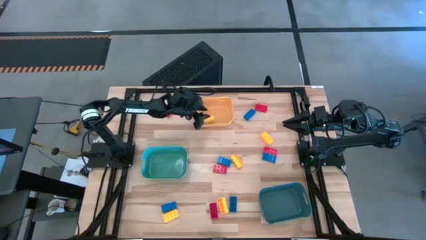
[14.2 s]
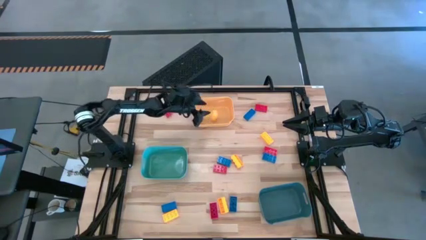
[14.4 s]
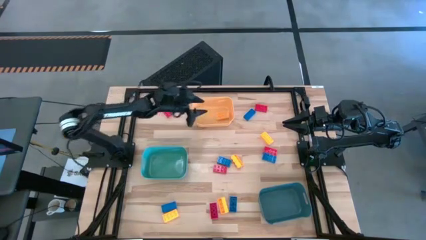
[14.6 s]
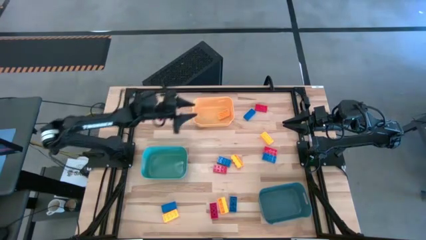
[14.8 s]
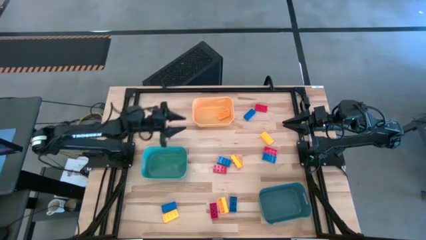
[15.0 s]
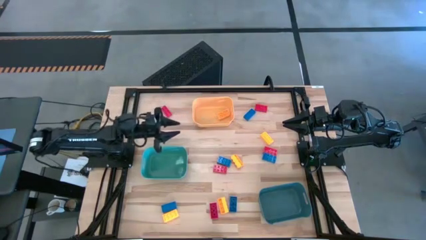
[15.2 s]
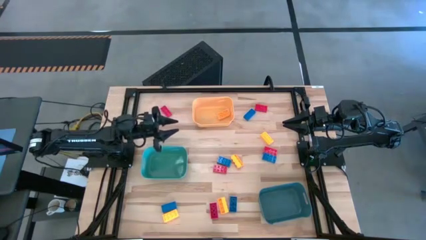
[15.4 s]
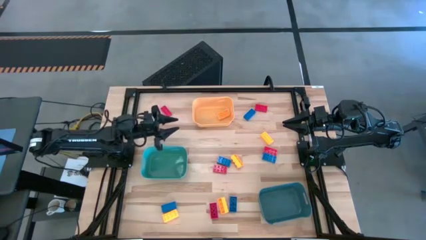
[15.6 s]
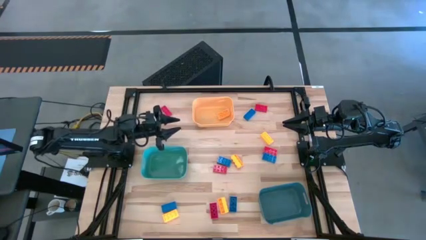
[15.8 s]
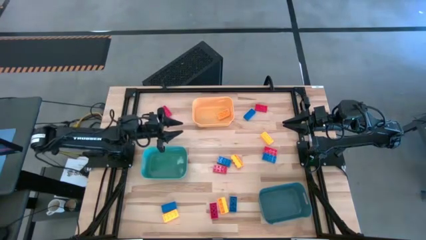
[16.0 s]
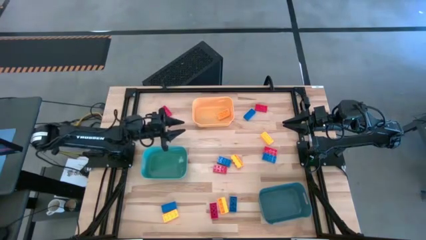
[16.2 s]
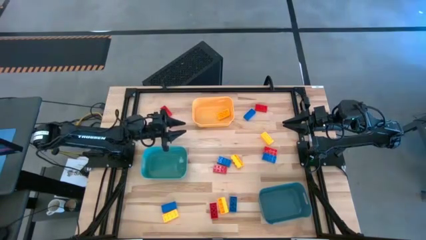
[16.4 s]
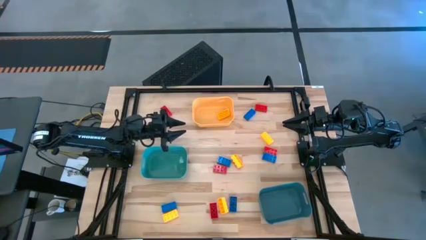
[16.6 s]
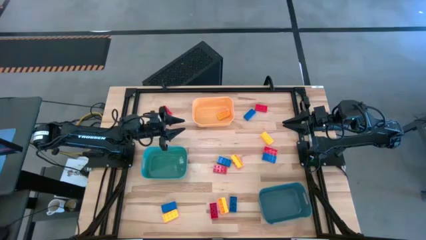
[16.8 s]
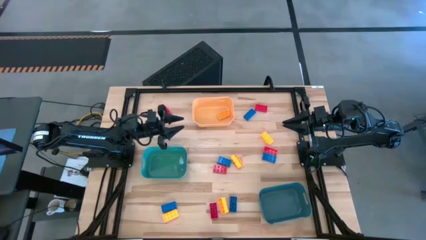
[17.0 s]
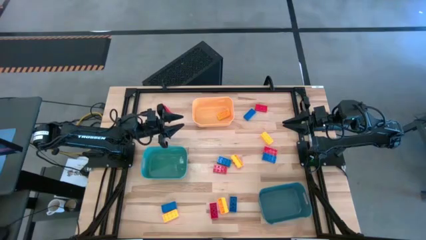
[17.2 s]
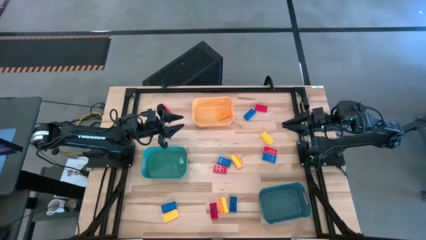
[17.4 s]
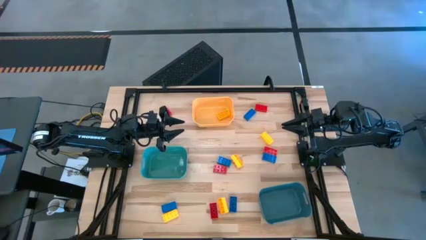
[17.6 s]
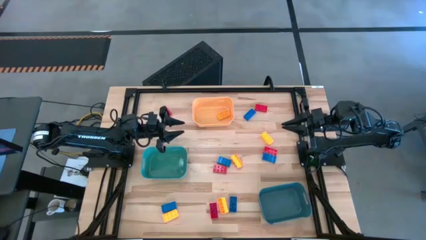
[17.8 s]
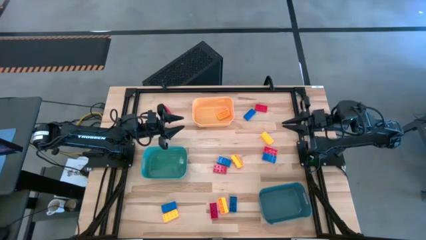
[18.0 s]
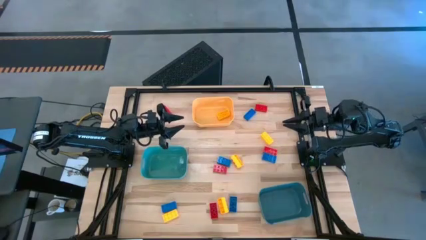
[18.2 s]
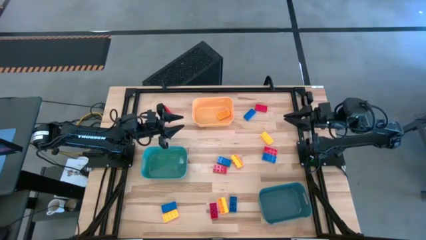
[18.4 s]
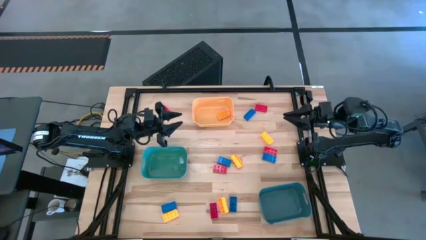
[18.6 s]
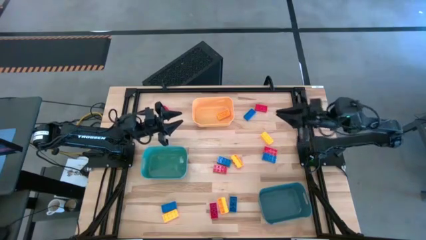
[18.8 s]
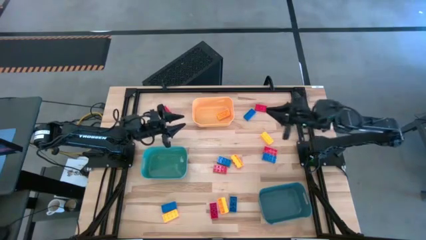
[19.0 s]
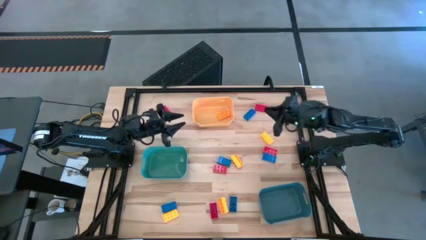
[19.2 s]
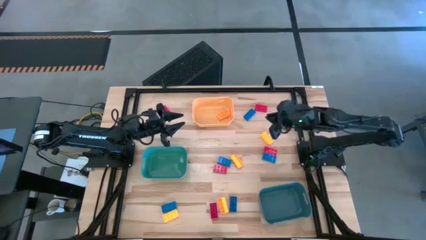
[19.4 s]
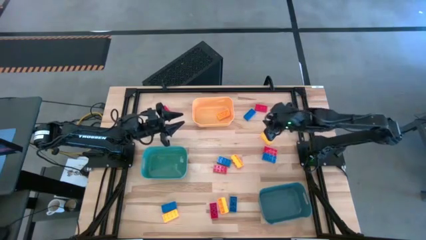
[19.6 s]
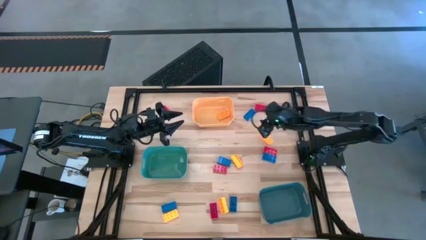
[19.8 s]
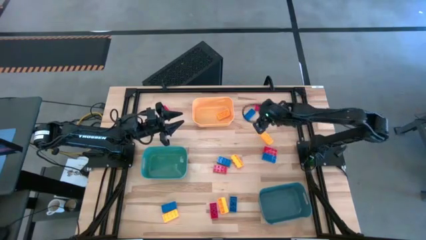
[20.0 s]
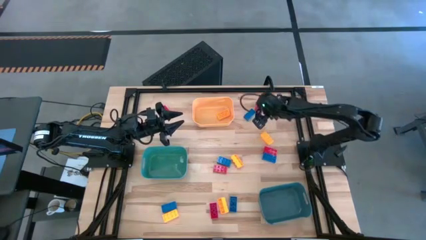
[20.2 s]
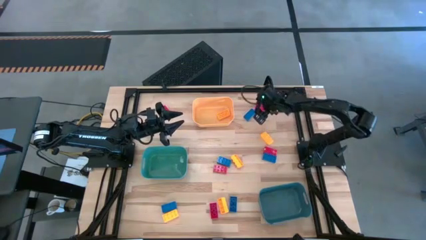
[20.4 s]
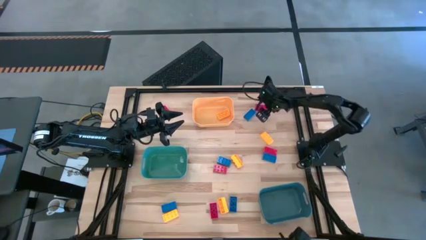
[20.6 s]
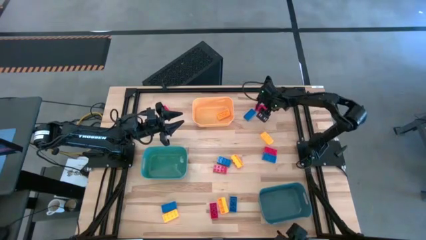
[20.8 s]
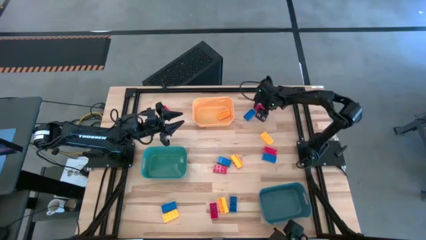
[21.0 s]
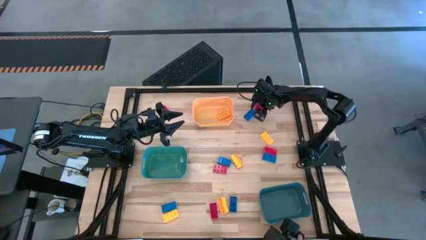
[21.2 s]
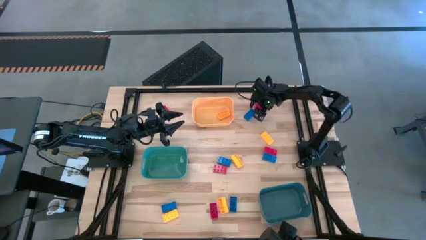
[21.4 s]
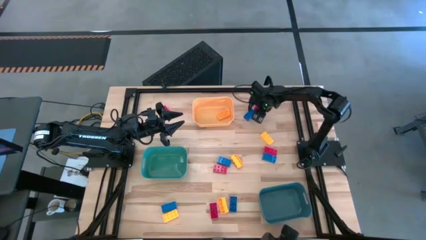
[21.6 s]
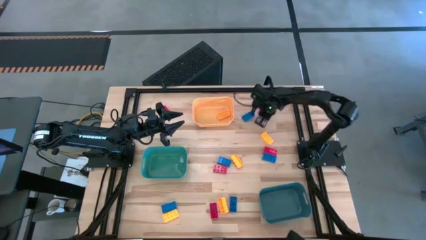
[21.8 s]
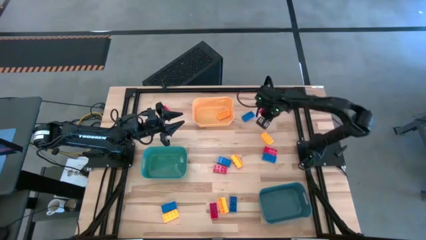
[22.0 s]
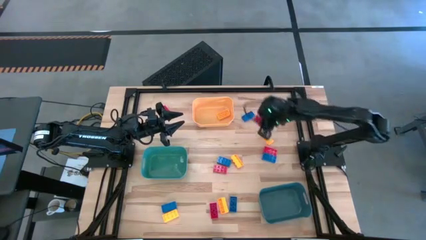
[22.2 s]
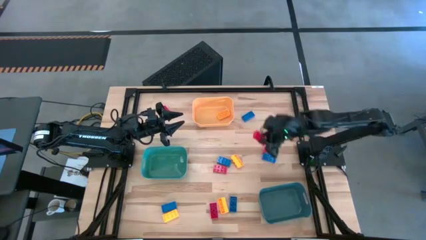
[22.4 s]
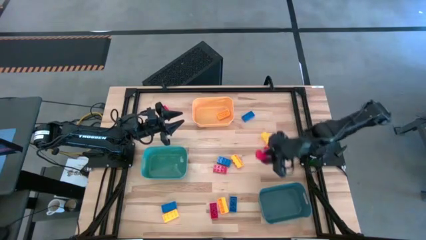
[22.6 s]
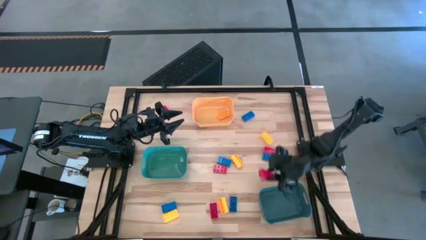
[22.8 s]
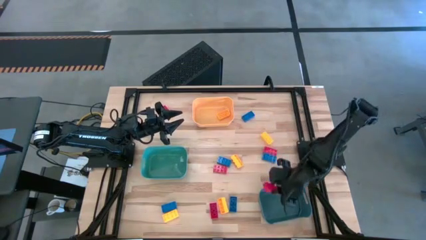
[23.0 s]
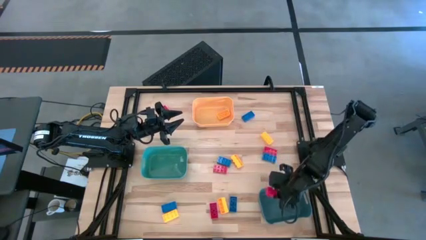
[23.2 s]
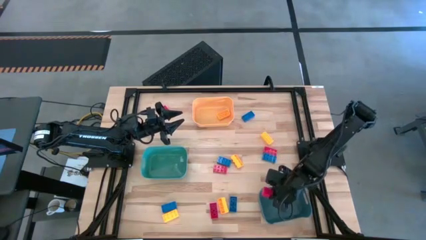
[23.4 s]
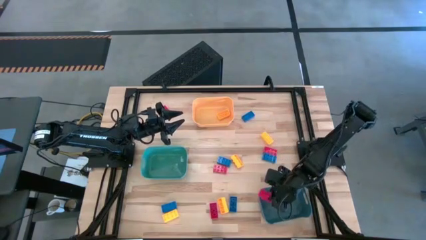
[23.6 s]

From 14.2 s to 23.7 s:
Task: Sort & place blocks by color
Put the red game piece into the blue bin

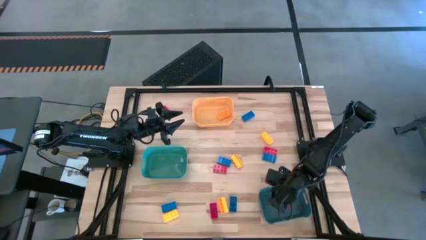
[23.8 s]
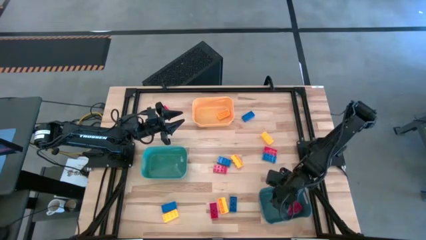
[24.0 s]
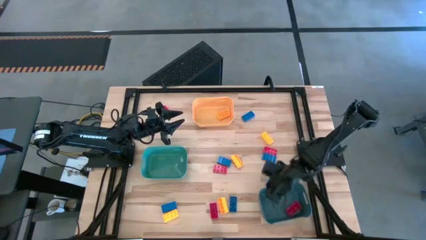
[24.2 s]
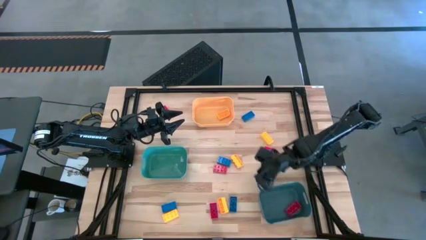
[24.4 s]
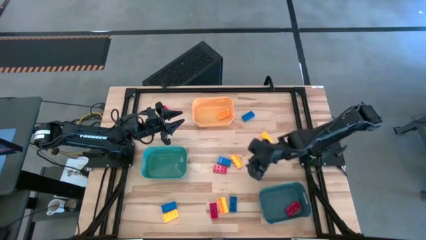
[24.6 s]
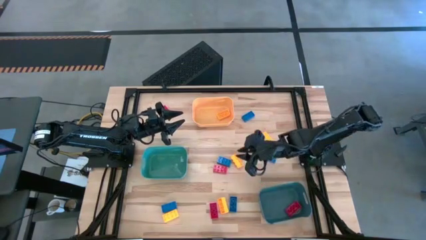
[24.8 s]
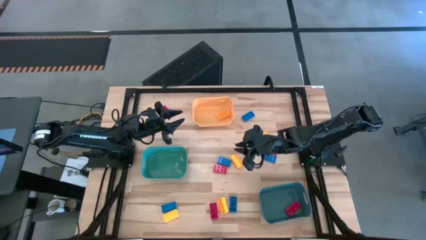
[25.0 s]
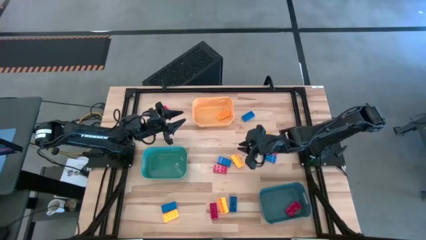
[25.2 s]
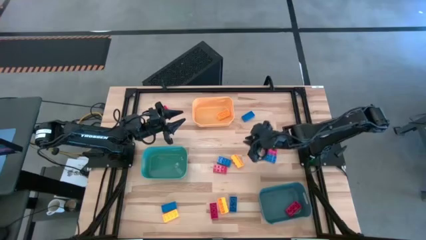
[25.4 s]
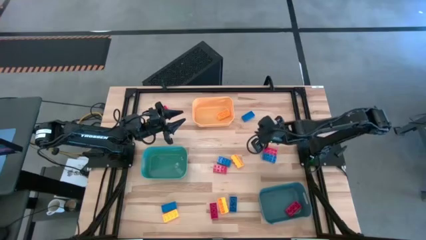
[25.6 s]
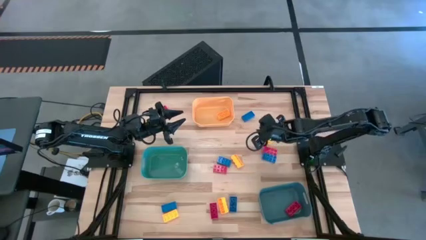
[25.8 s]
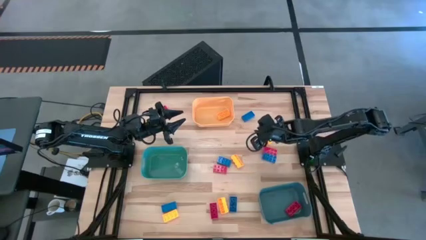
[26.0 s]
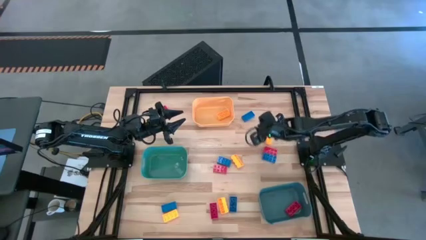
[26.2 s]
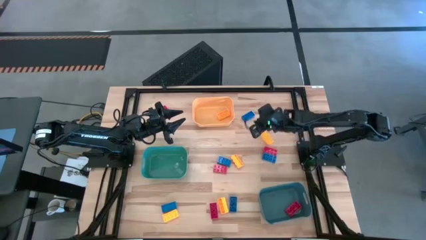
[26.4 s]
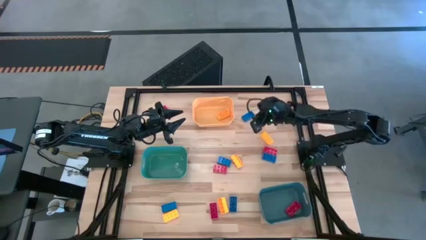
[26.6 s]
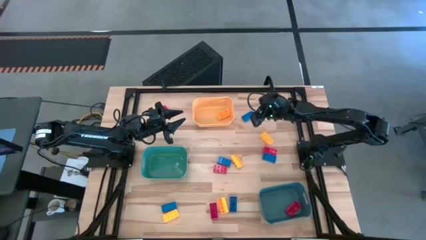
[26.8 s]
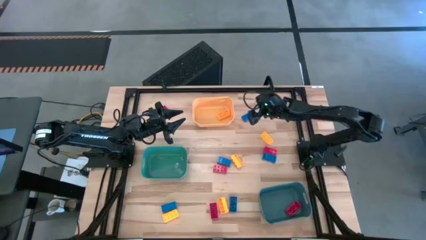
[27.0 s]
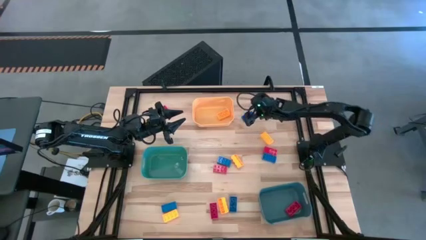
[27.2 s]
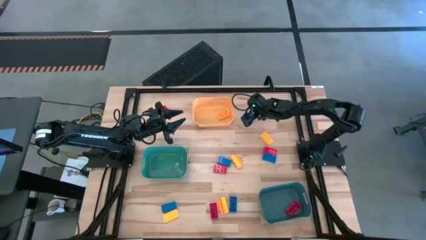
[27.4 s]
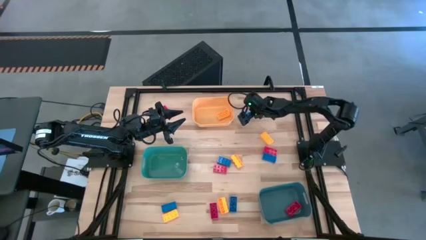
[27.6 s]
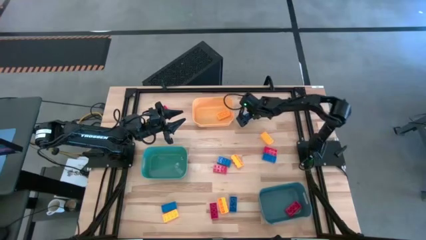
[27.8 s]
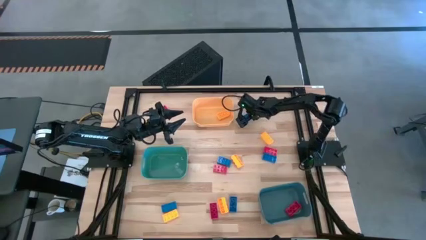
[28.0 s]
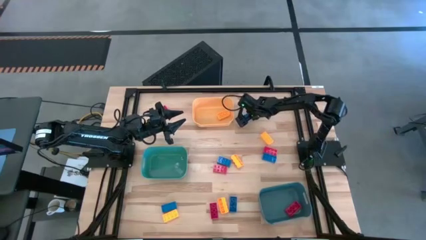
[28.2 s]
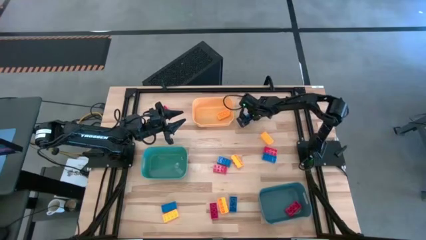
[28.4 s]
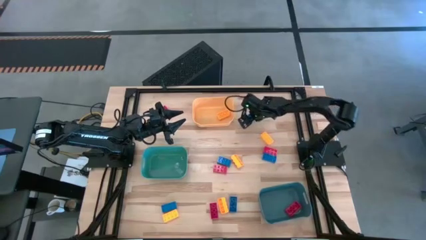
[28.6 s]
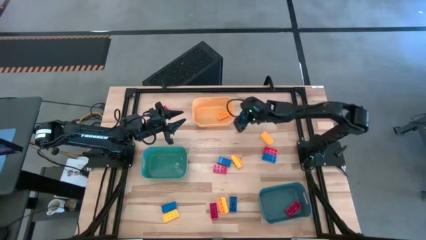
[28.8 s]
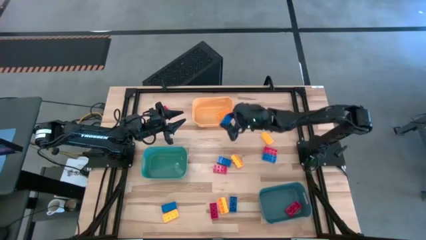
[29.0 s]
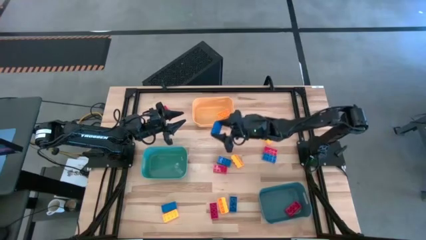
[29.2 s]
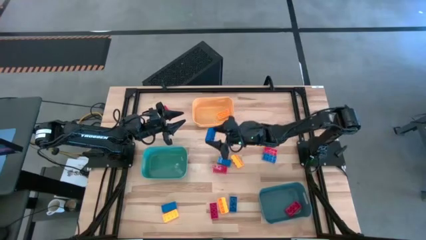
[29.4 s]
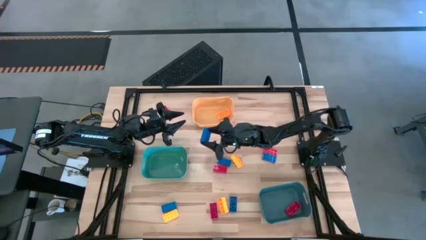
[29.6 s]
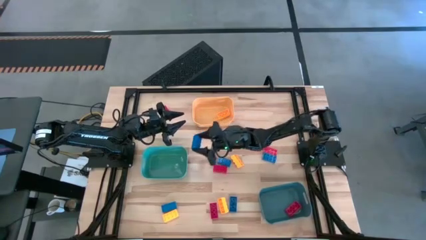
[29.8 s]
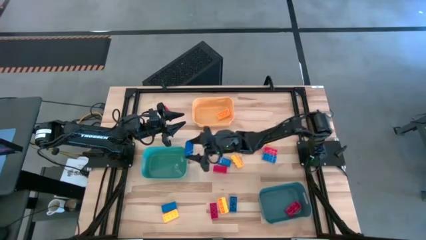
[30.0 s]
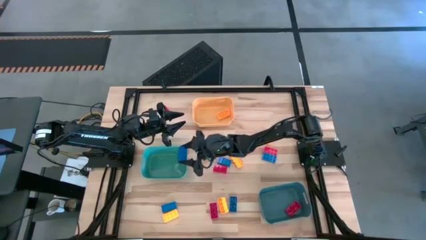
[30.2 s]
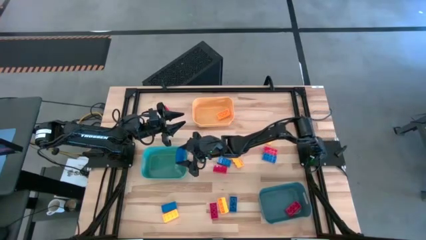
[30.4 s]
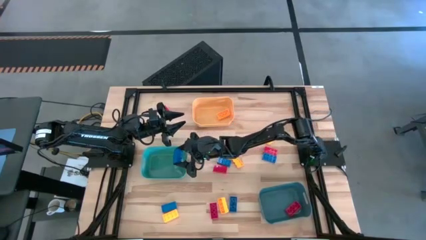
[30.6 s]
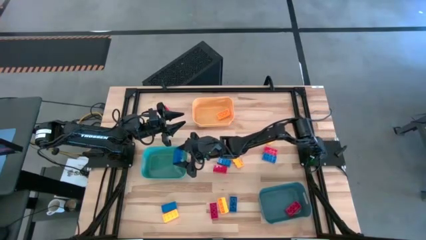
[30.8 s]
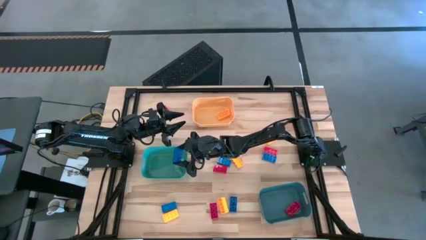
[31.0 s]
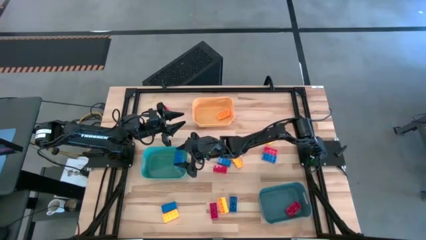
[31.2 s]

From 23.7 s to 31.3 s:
Put the blue game piece into the green bin
